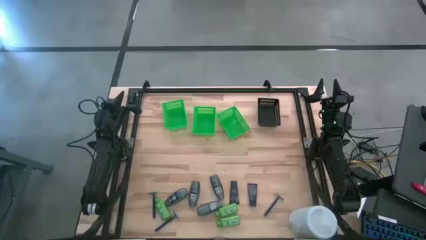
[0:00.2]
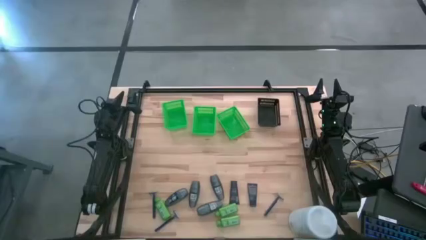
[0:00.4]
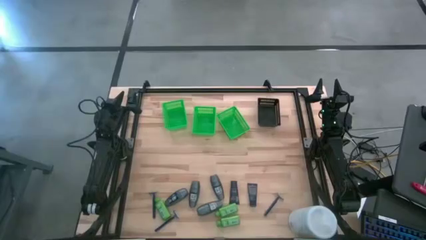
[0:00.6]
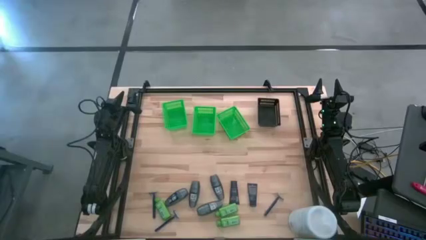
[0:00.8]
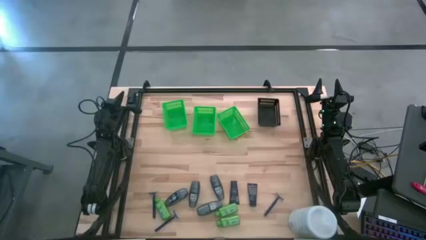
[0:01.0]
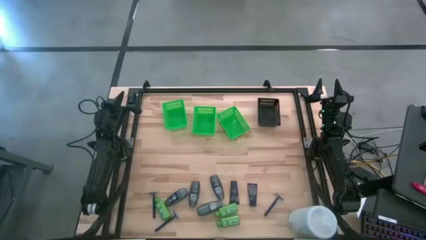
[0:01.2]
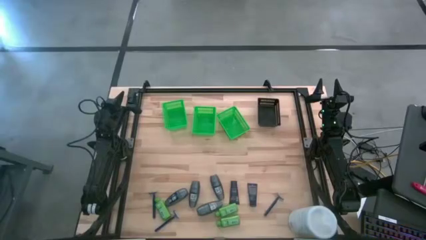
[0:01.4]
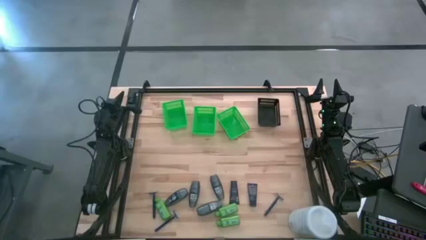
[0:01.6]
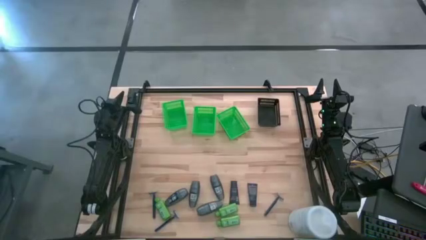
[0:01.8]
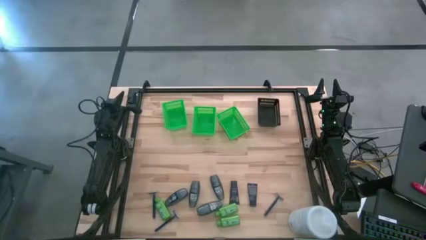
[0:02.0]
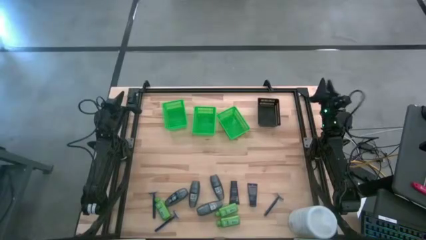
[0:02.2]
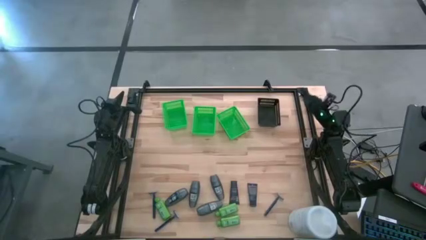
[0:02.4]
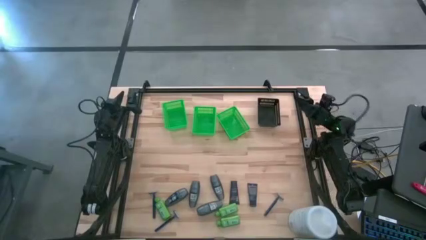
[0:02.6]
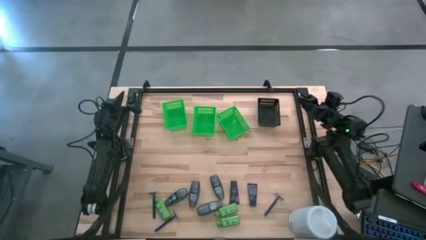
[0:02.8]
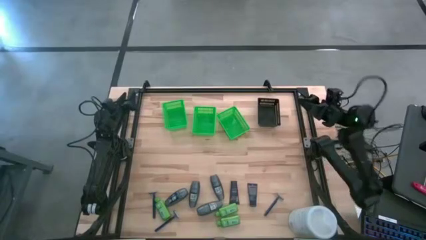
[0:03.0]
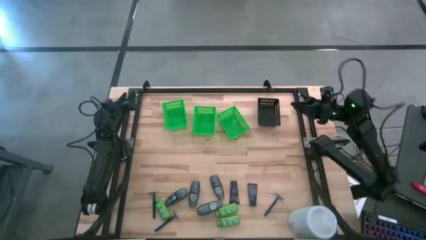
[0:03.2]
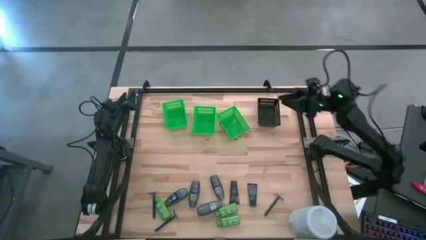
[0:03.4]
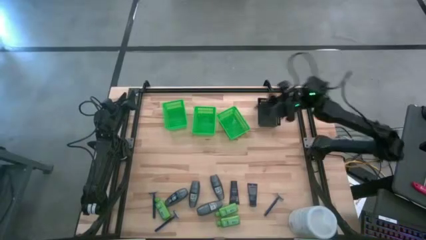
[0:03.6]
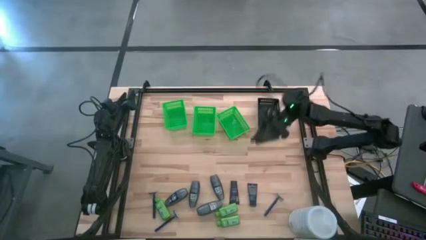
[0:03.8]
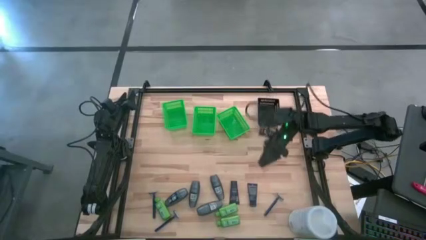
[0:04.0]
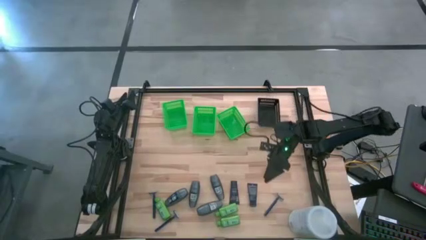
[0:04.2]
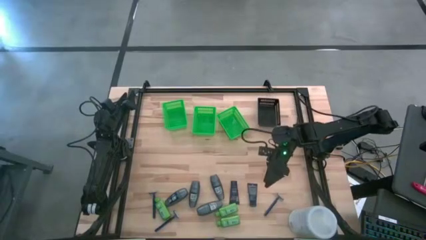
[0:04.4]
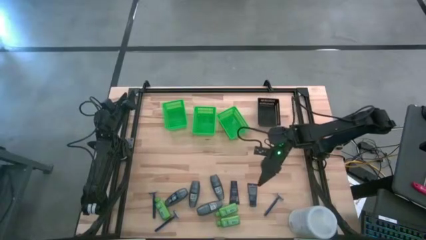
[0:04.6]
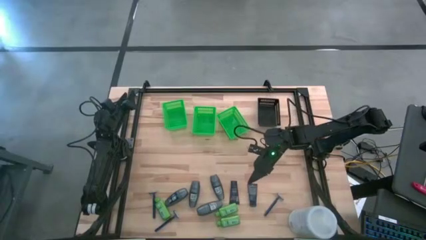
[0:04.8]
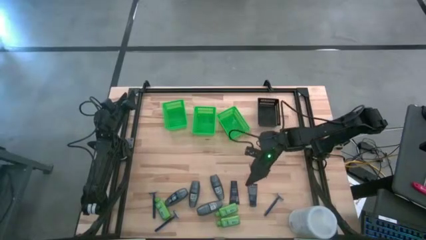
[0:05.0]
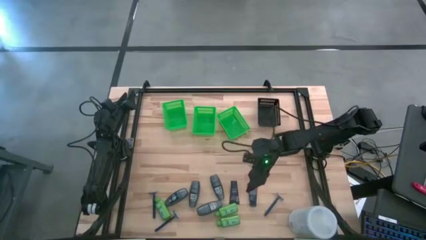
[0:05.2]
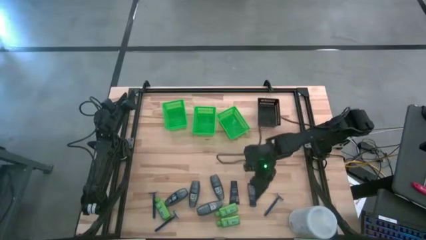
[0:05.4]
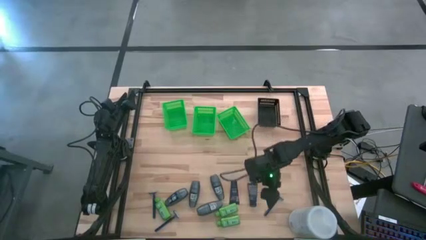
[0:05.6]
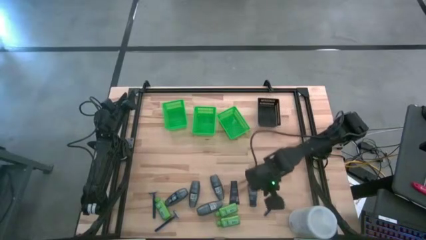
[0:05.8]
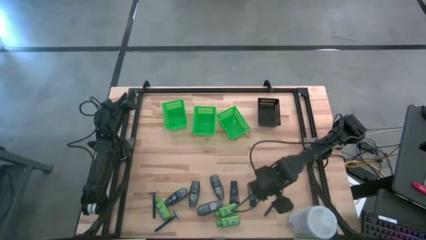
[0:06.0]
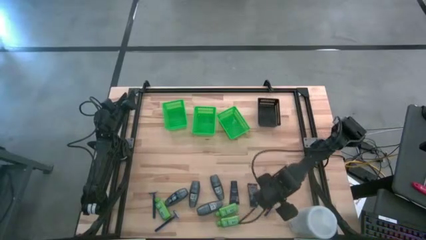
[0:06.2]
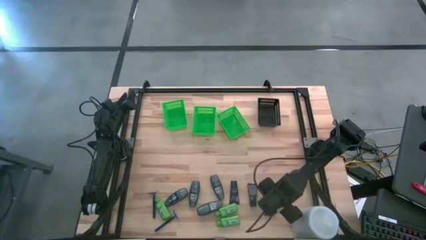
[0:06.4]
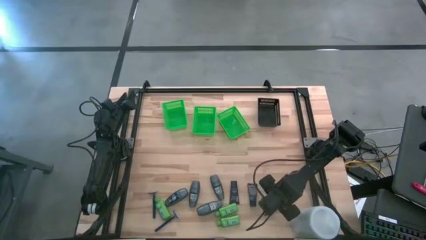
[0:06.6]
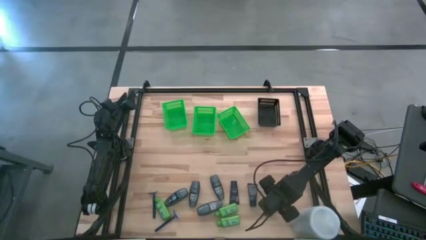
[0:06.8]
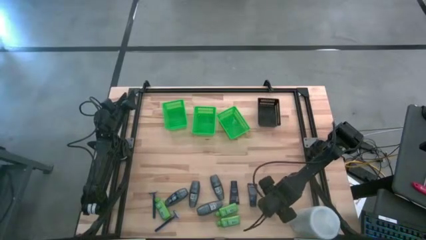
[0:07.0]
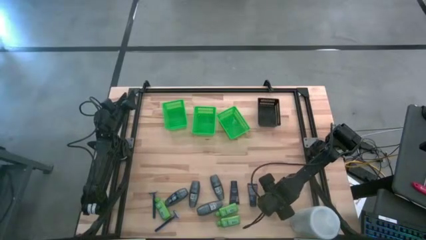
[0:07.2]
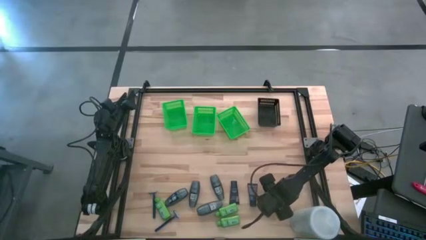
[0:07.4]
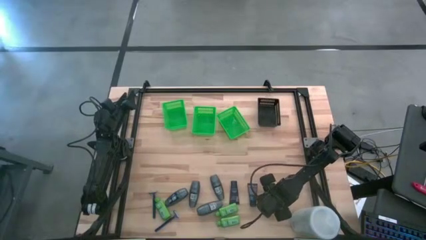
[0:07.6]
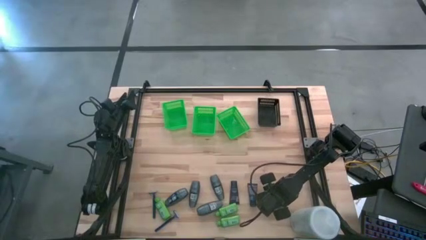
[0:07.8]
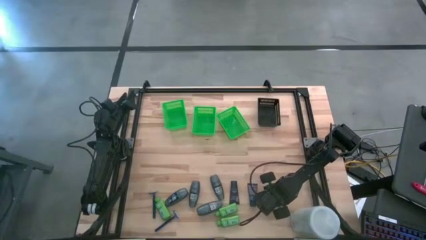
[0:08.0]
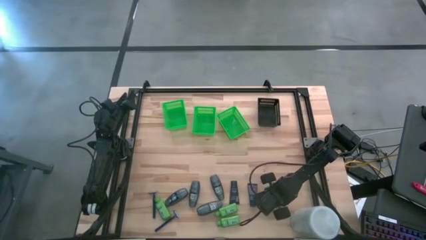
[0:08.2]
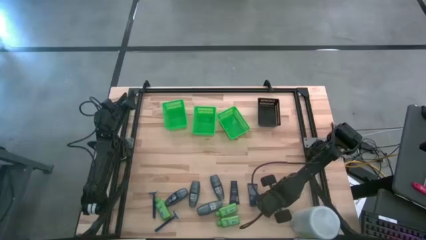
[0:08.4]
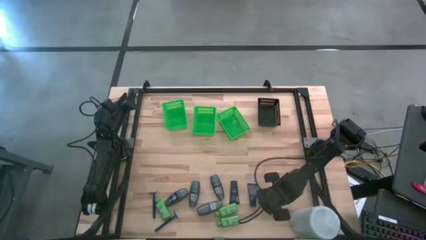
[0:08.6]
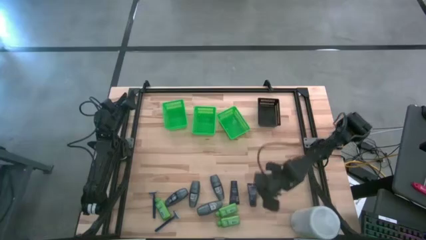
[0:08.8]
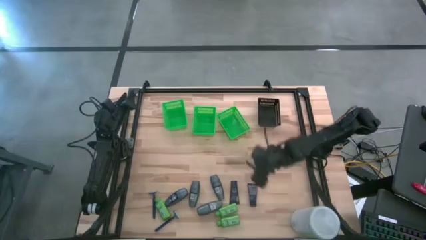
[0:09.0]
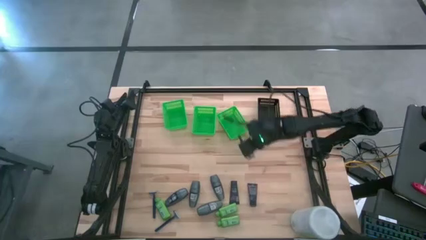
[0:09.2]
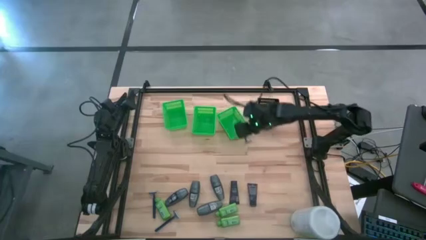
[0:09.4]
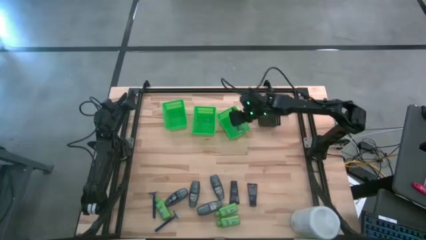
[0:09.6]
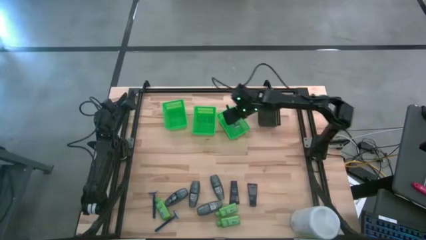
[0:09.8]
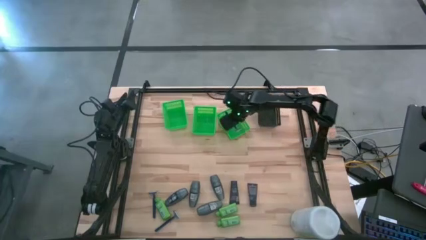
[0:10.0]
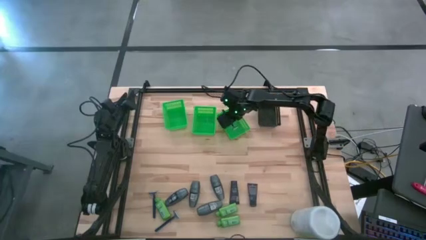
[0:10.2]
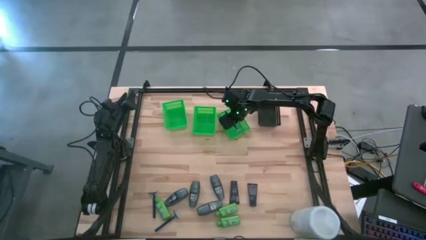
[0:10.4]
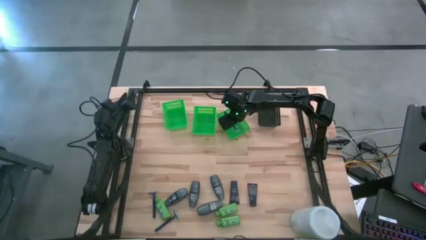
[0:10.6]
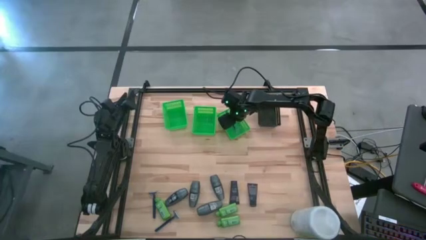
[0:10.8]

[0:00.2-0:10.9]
Task: Pick & Place Travel size toiletries
Put the razor into the right green bin

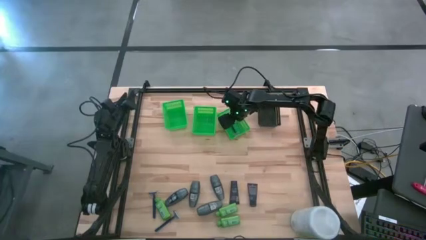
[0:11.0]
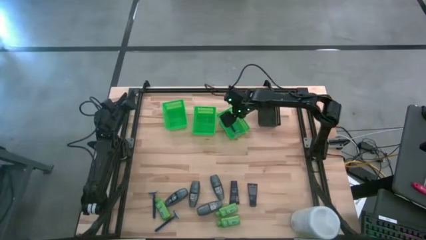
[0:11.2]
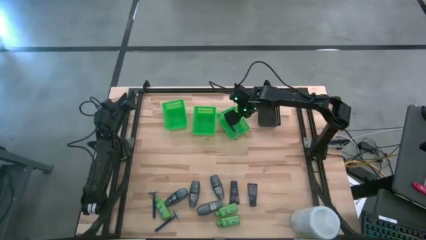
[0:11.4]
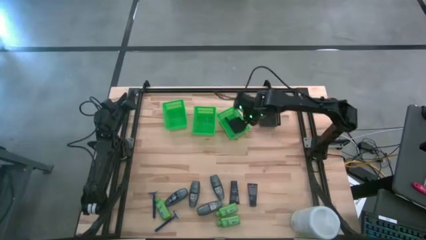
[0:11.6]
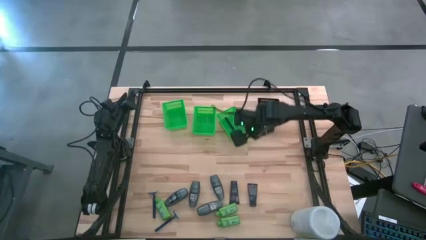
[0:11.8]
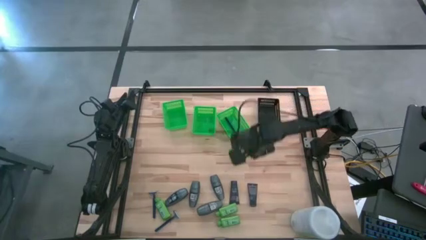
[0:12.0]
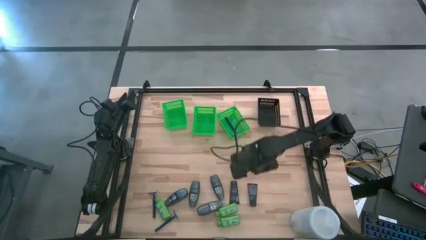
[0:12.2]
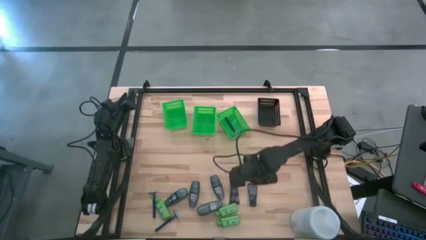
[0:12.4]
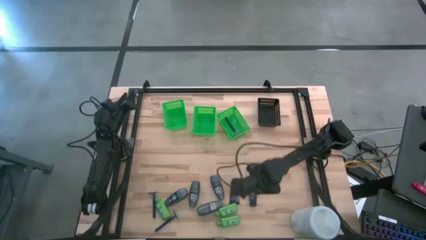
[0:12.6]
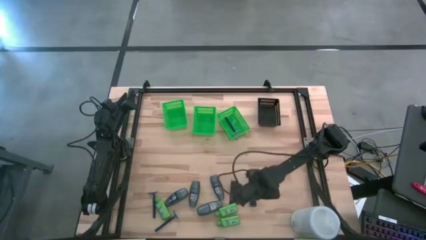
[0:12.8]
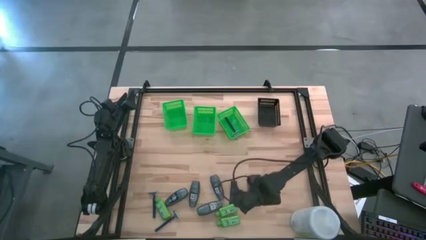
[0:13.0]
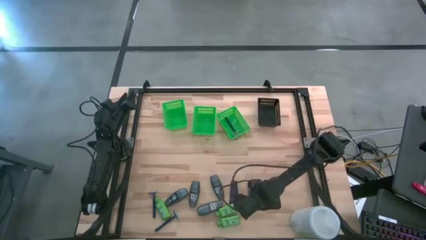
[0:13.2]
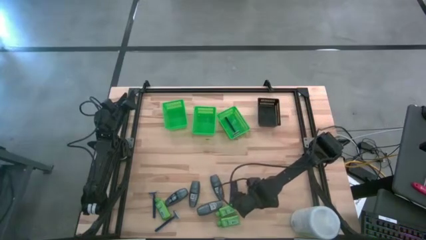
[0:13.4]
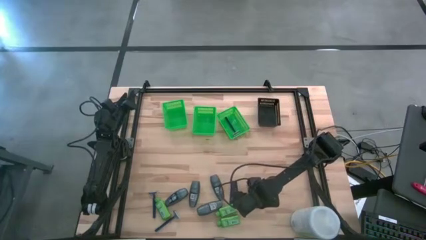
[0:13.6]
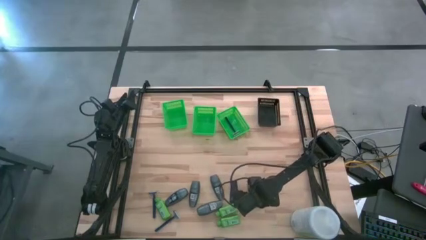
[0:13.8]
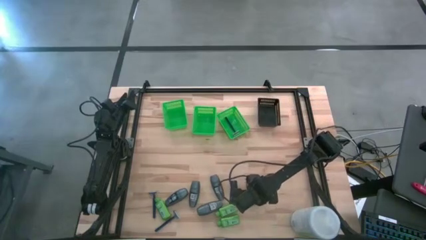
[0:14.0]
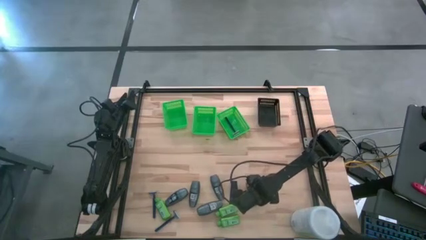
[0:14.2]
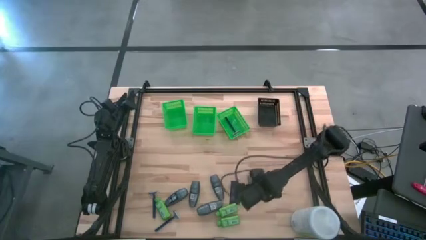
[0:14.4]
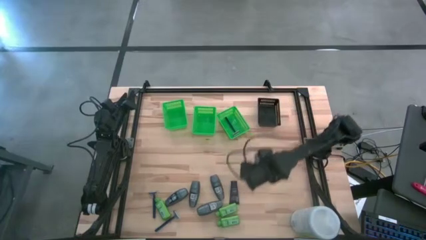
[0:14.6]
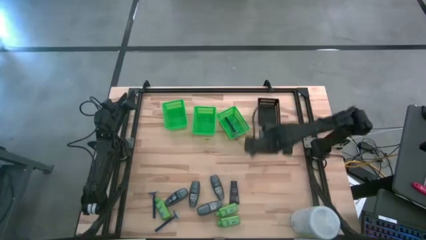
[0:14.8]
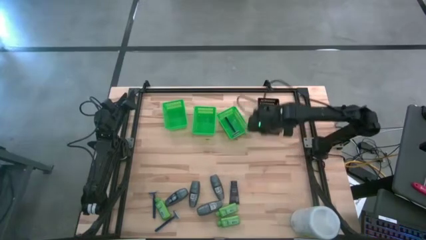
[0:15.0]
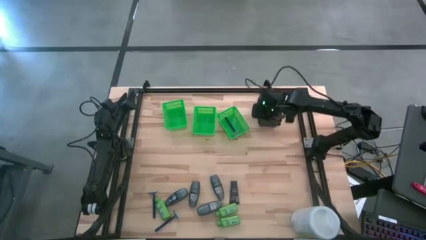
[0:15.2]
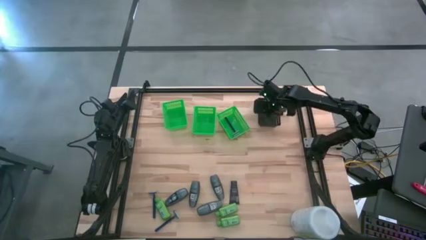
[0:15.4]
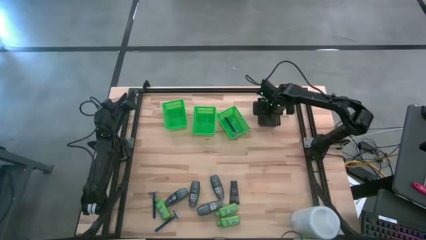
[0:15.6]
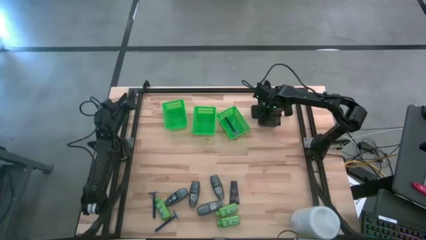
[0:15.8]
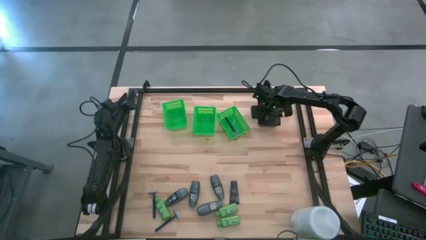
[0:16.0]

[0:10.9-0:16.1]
Put the shave cream into the black bin
